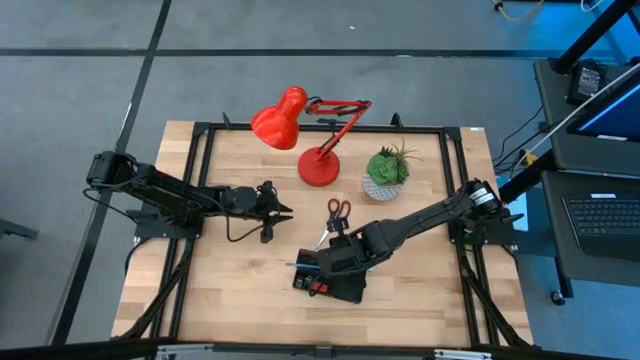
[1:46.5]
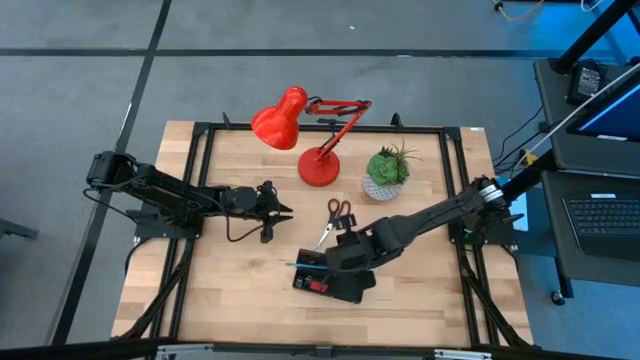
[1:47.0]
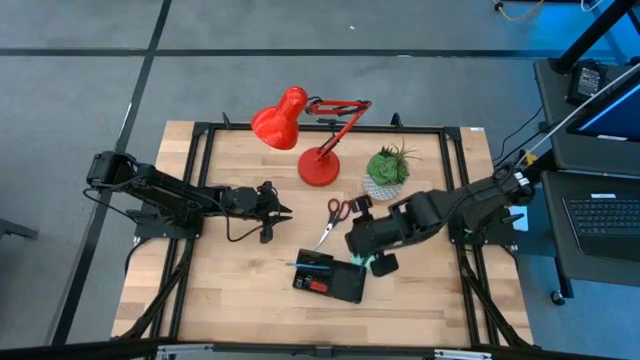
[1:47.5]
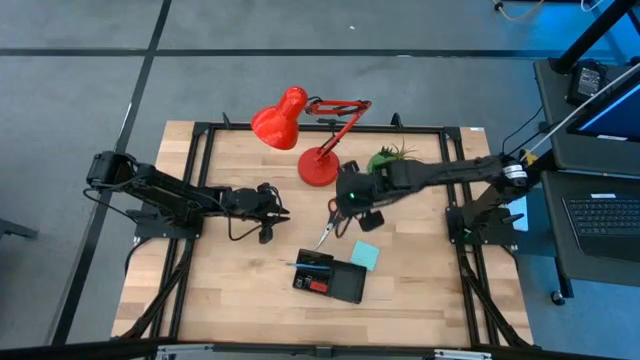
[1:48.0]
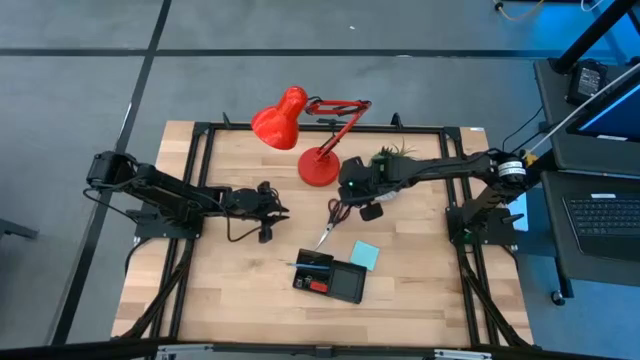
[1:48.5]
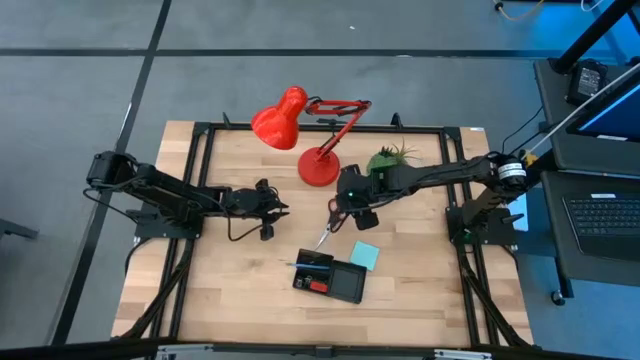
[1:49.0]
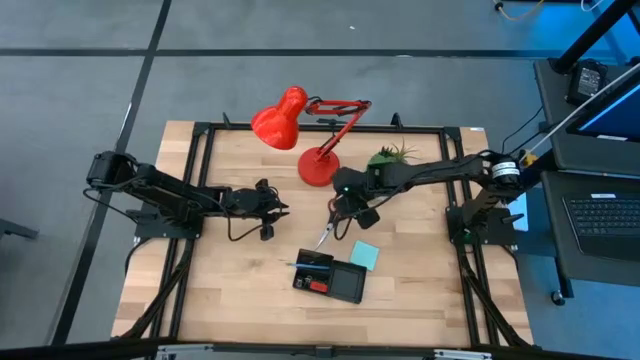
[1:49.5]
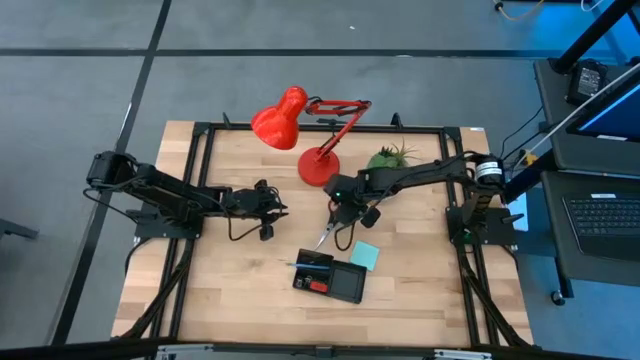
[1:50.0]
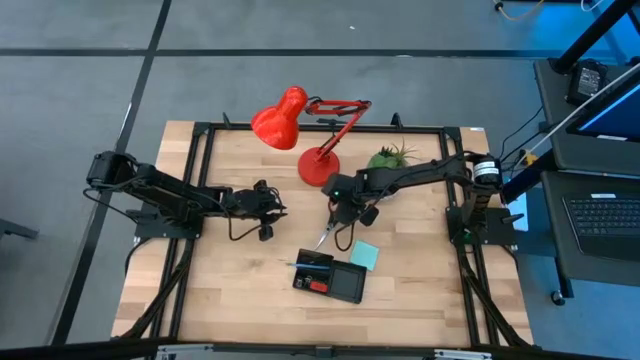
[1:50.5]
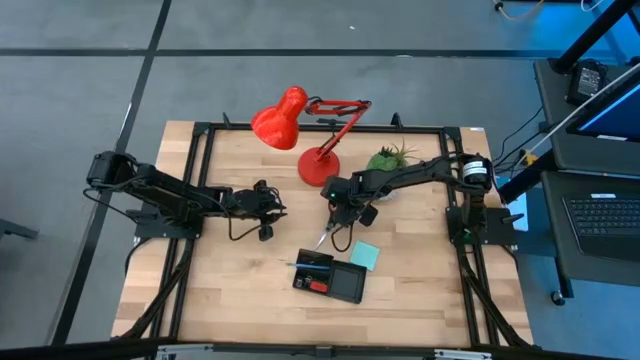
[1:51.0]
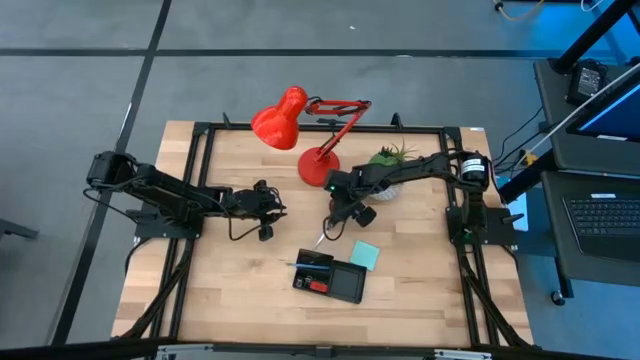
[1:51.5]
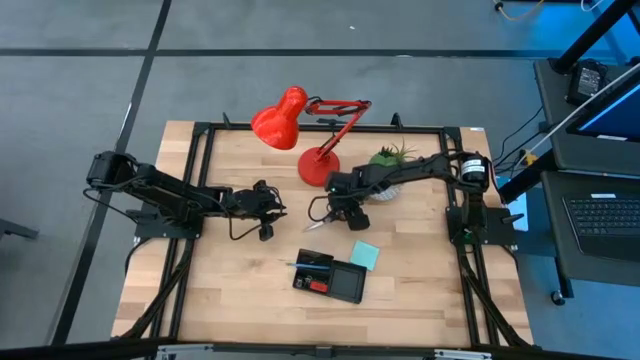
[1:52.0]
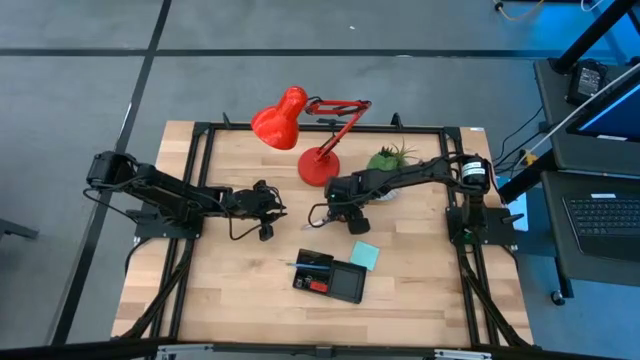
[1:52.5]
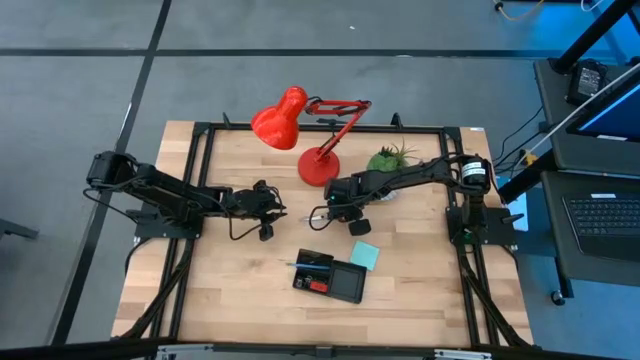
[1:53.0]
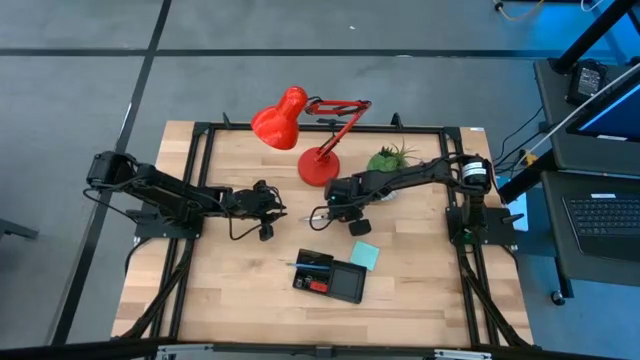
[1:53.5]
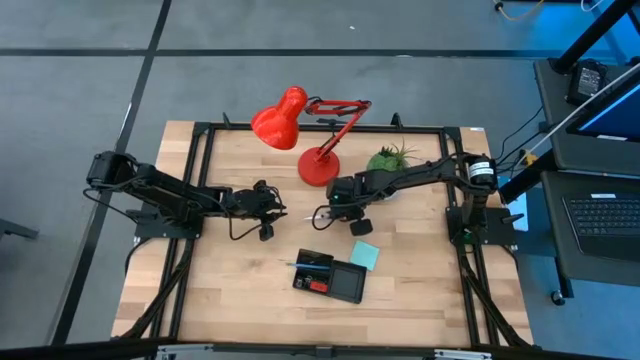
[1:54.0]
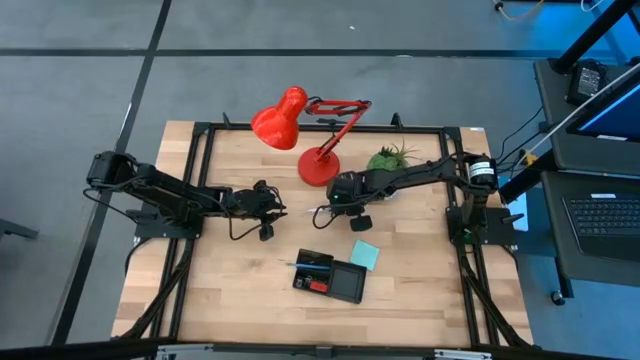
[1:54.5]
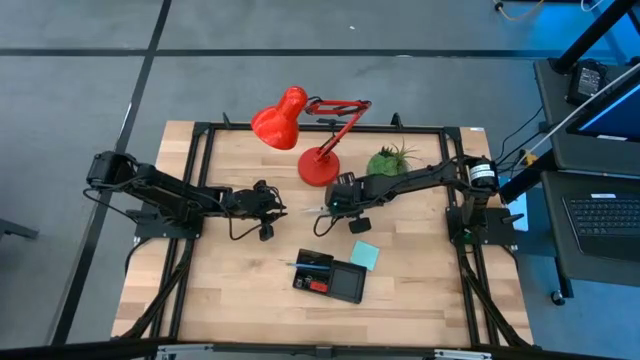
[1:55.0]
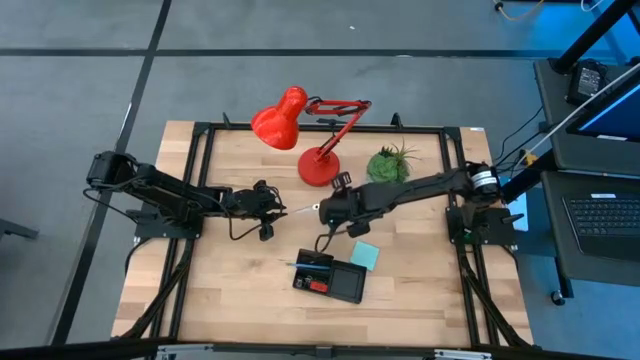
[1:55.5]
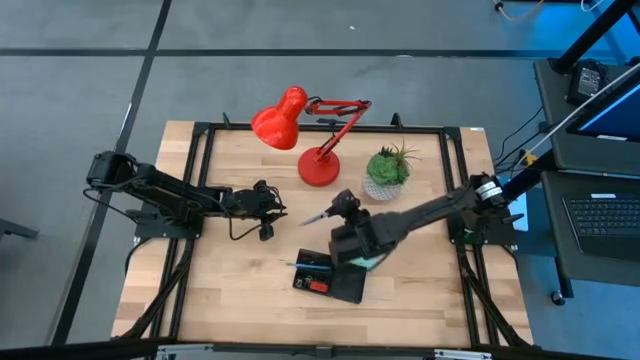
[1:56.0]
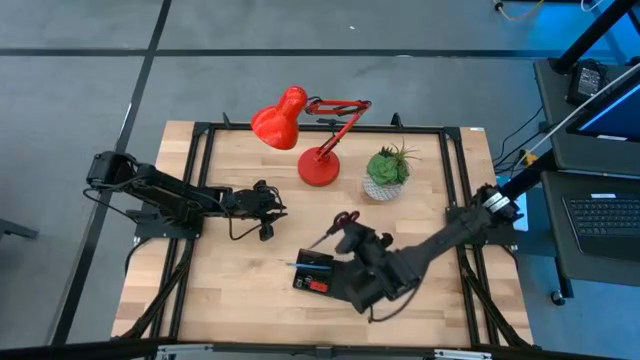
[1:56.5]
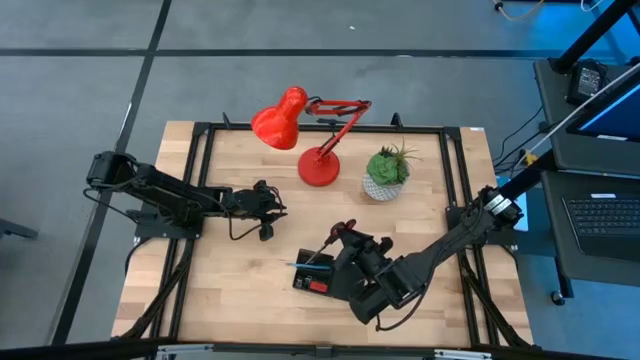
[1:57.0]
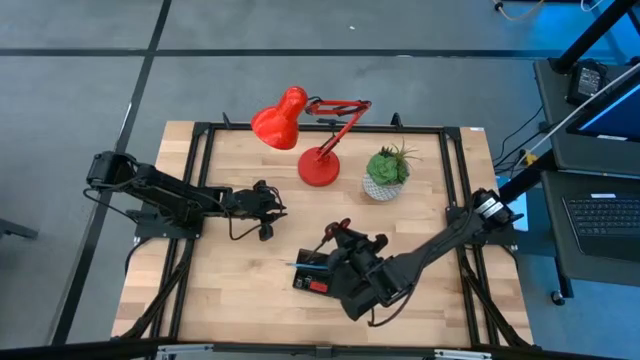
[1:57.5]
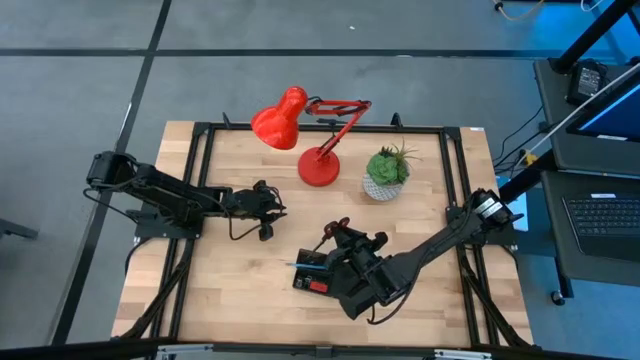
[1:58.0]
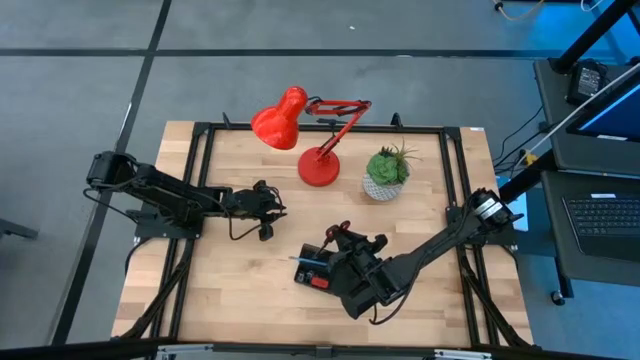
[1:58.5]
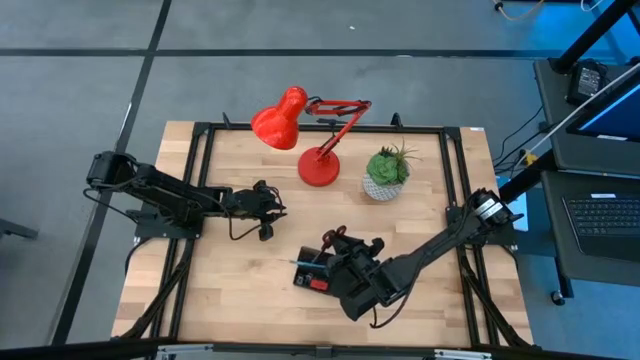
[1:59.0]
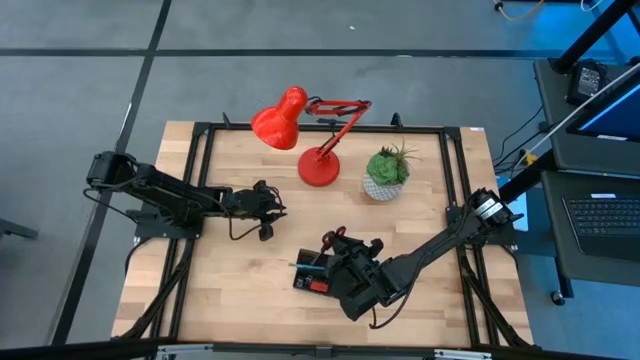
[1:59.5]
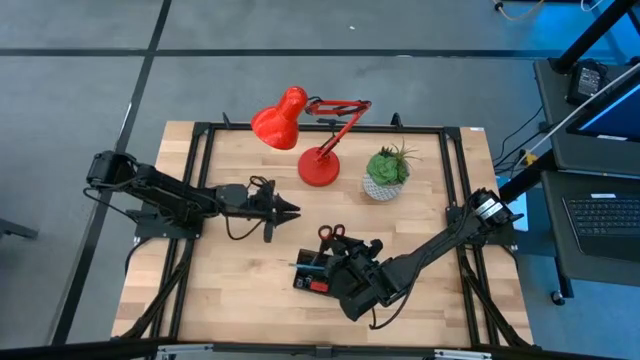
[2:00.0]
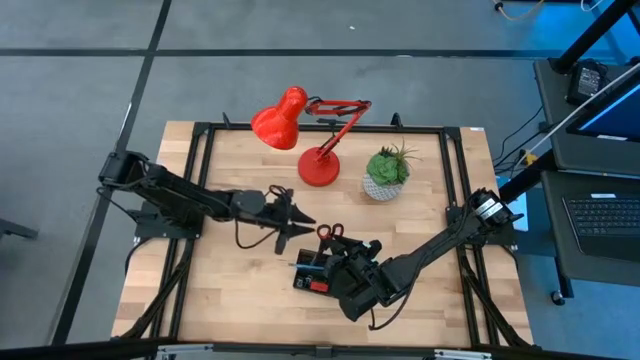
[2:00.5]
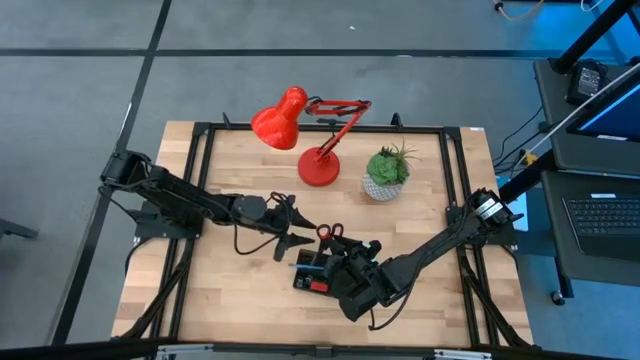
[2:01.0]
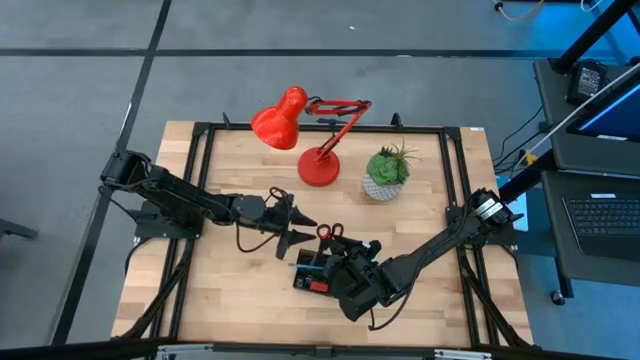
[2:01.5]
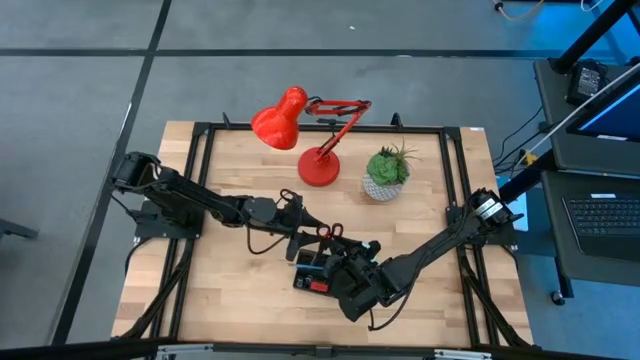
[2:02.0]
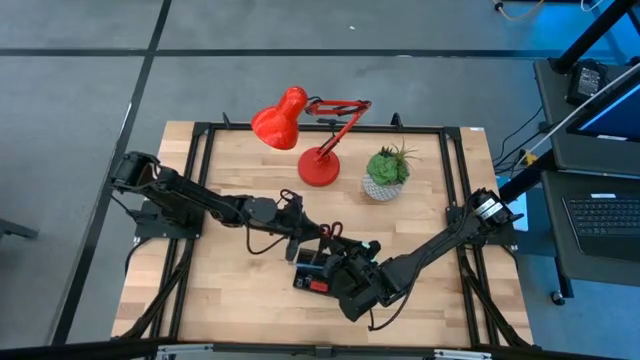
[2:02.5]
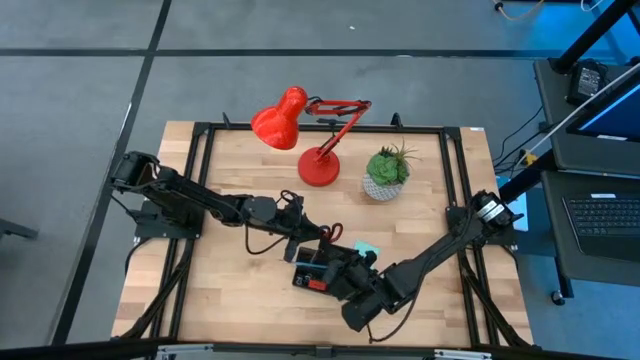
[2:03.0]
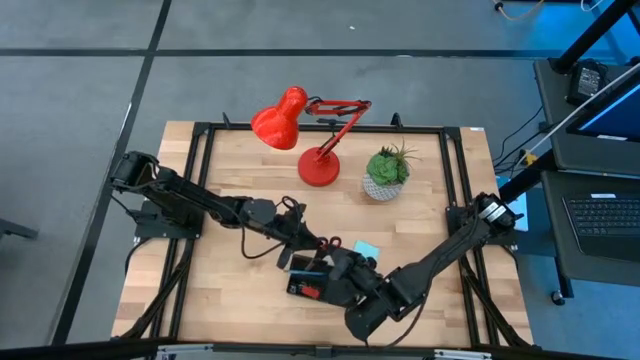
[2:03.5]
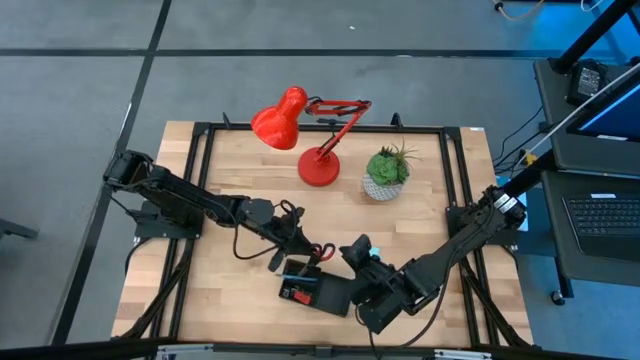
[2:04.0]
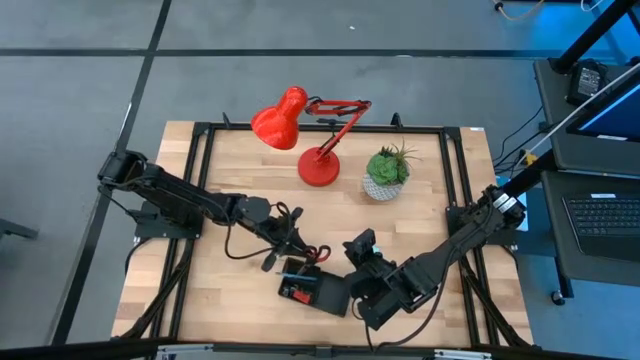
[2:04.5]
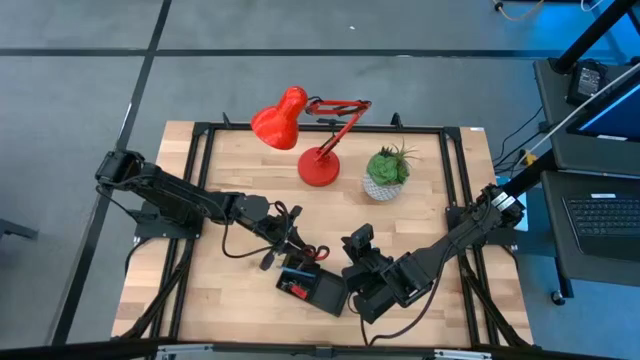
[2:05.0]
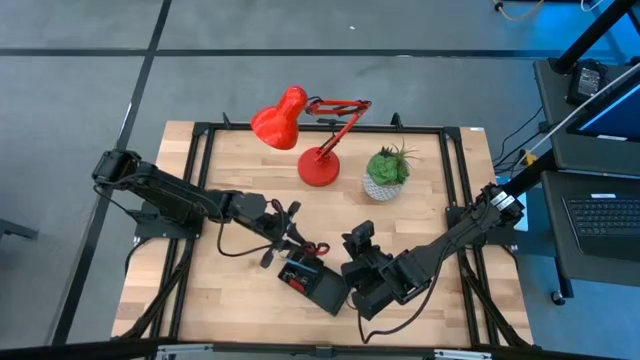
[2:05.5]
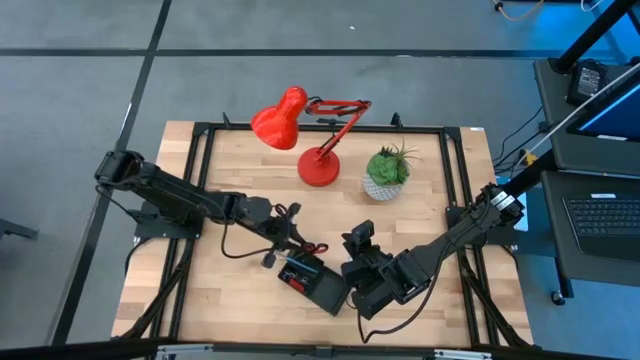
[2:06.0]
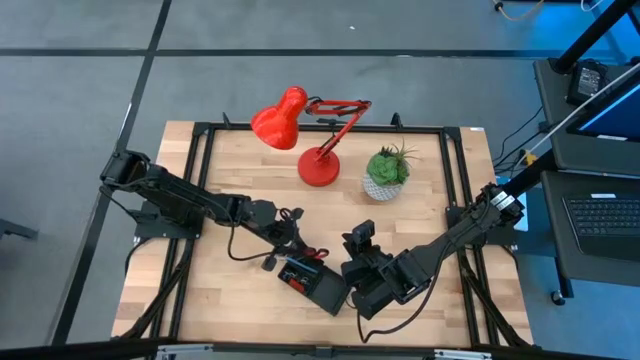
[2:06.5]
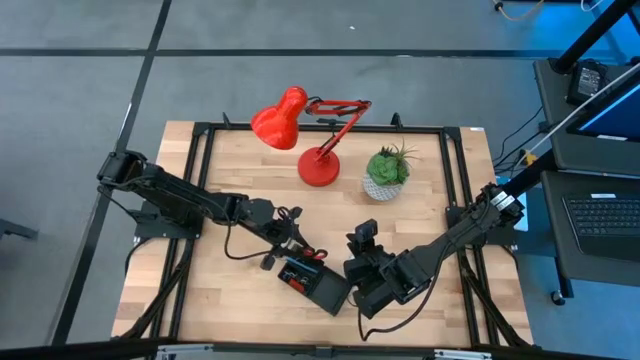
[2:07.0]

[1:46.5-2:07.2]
Task: Pick and place office supplies into organizer
Put the black scissors into the black desk organizer
